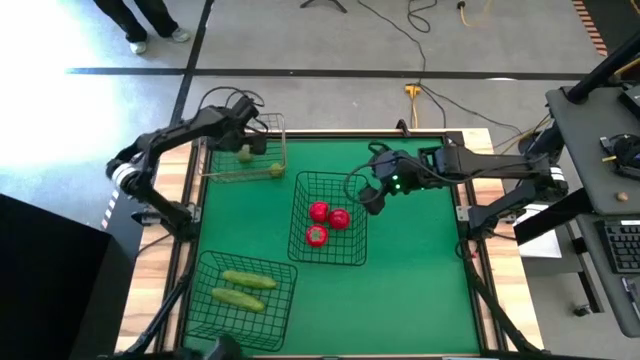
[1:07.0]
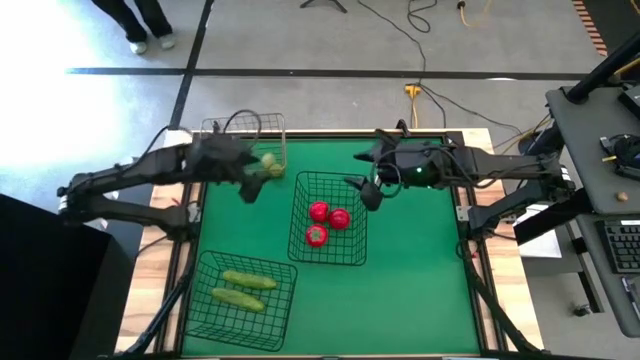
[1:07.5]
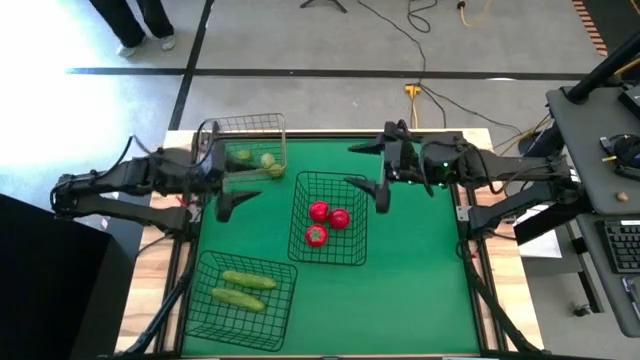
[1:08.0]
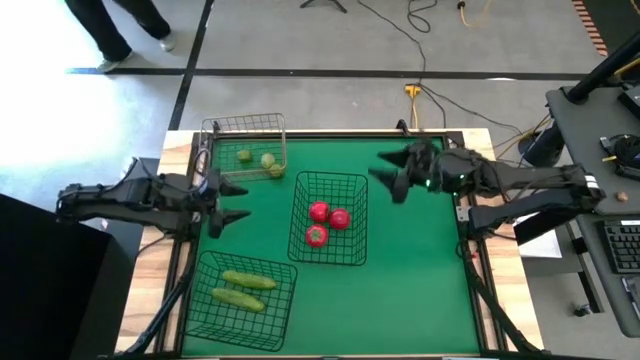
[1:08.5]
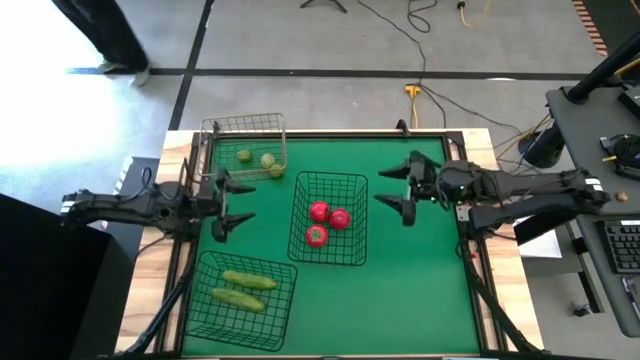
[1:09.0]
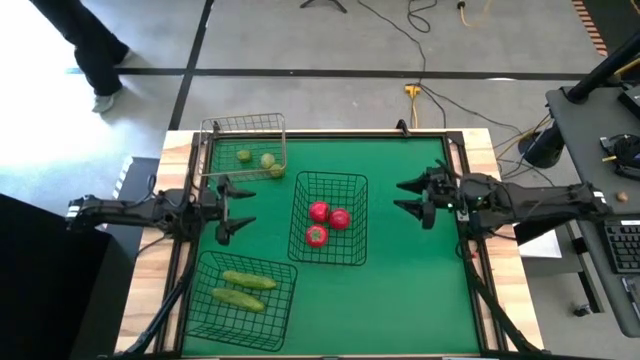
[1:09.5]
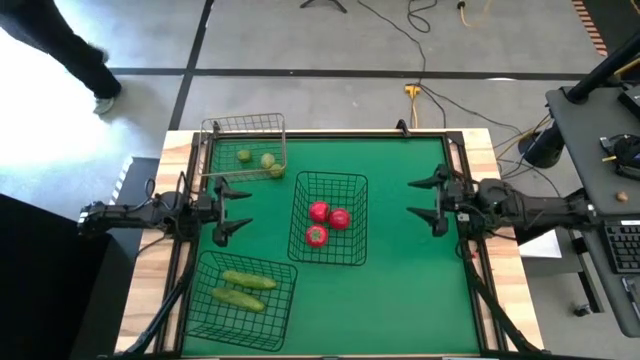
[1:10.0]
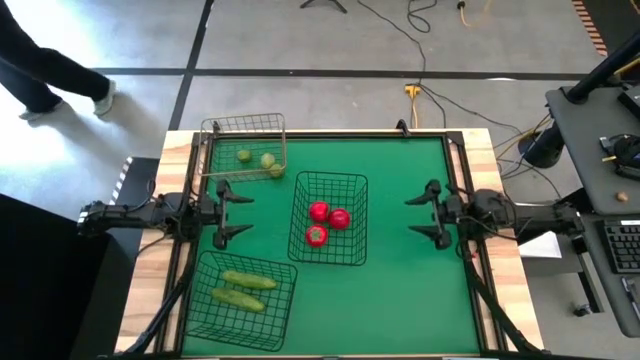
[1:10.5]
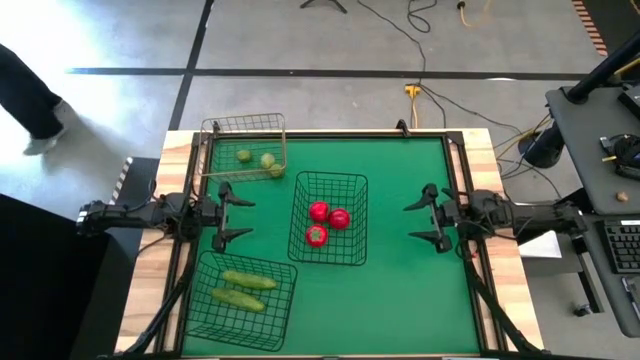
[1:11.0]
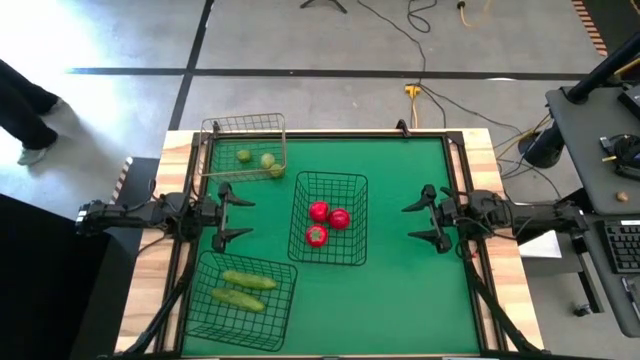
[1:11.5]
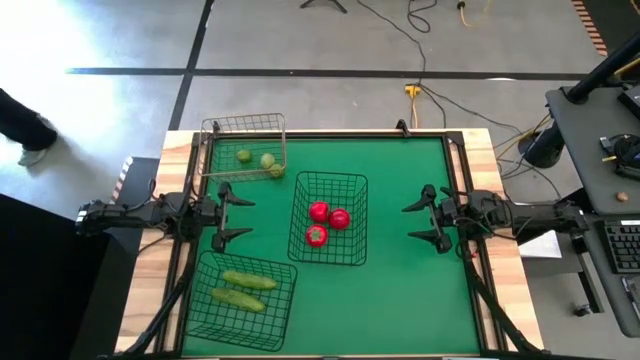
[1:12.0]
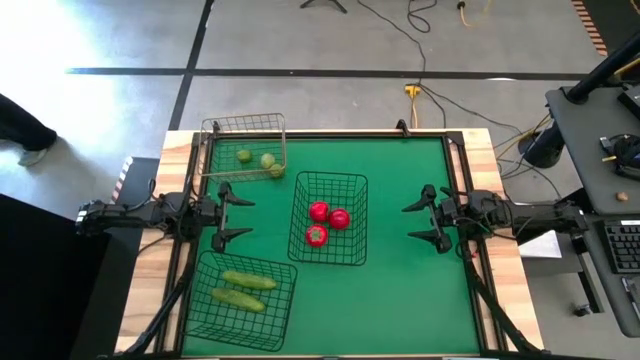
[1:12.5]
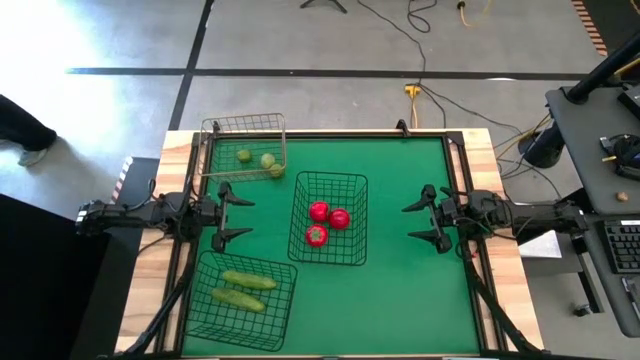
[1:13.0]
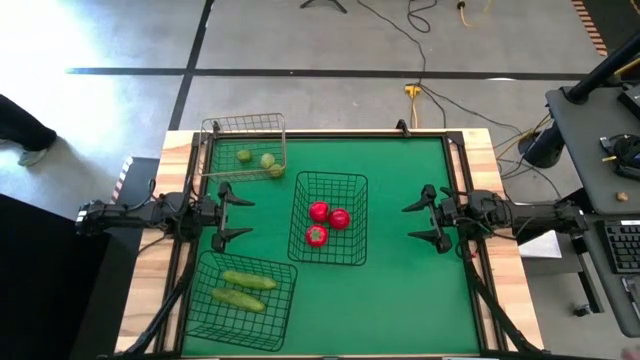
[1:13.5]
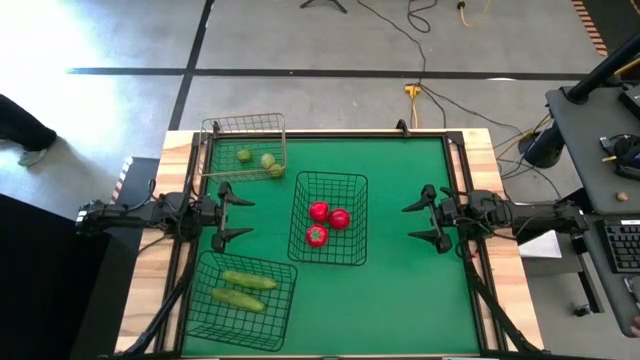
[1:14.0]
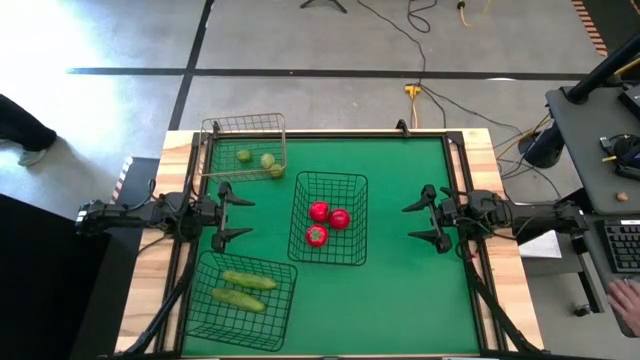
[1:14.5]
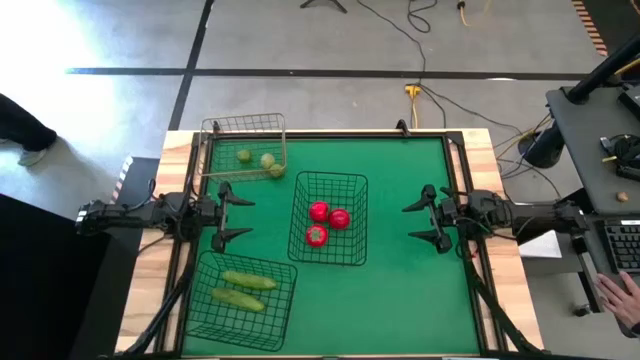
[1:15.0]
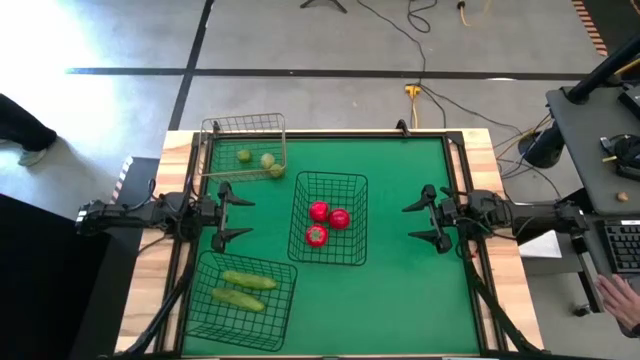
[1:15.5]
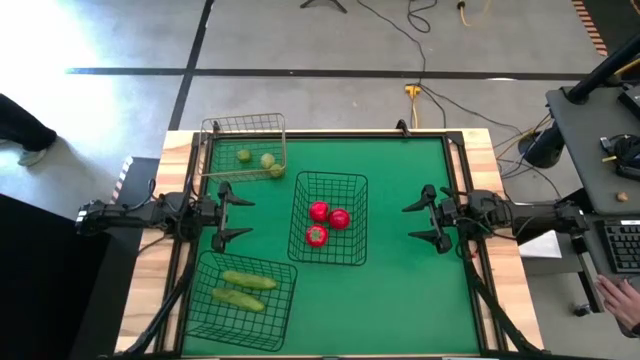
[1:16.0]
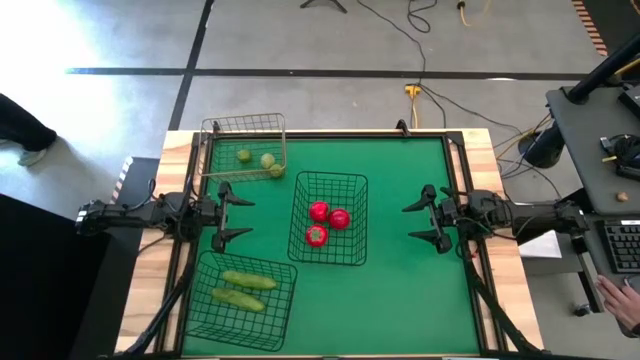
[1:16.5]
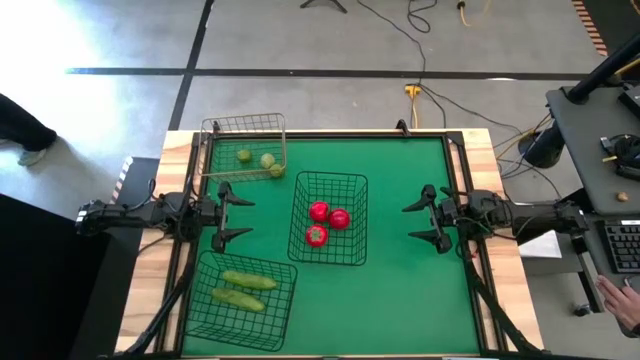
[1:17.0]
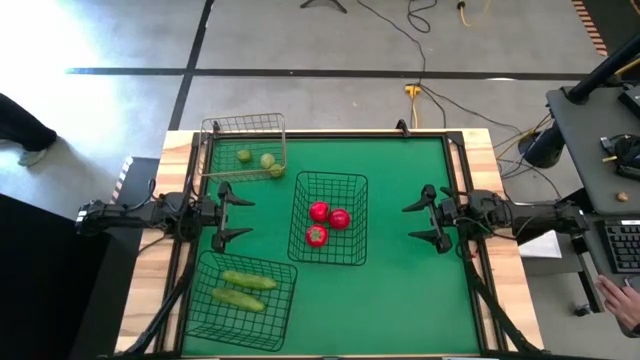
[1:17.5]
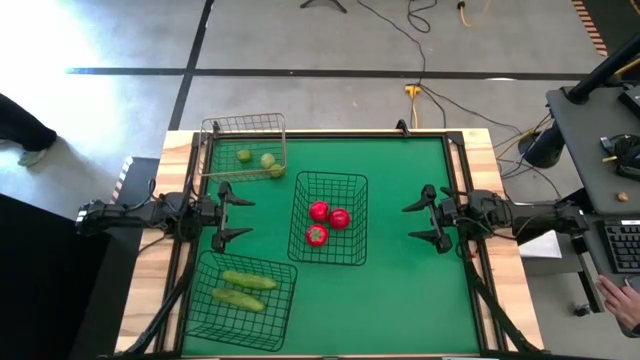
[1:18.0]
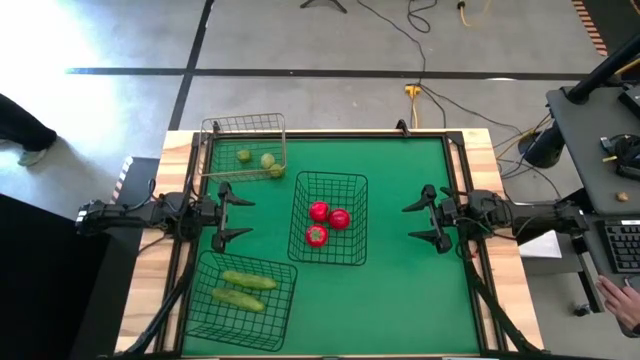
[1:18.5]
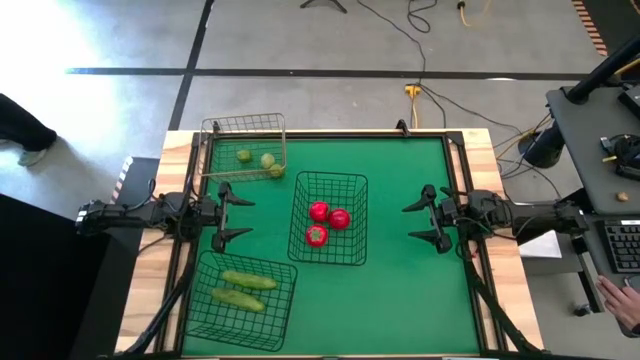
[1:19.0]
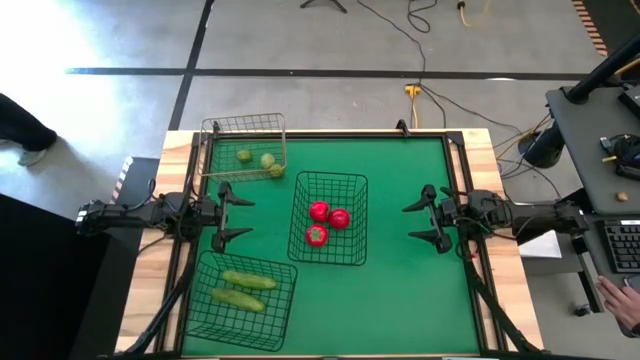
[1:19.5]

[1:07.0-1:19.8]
Task: Sort produce into baskets
Return to Home Position

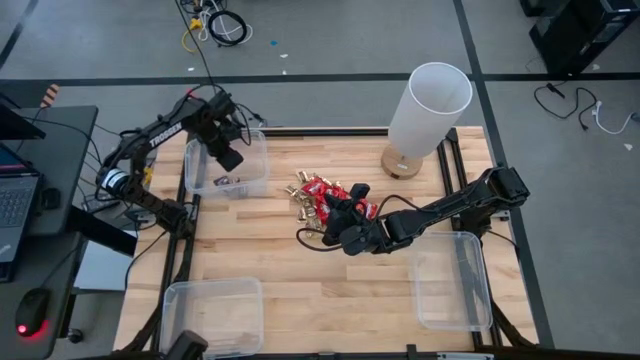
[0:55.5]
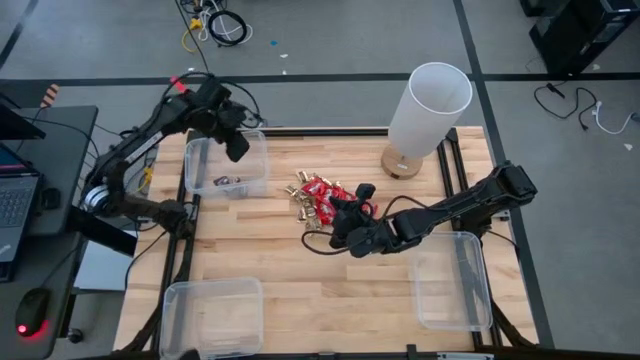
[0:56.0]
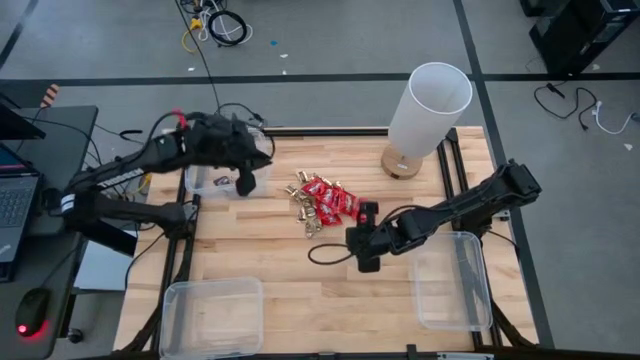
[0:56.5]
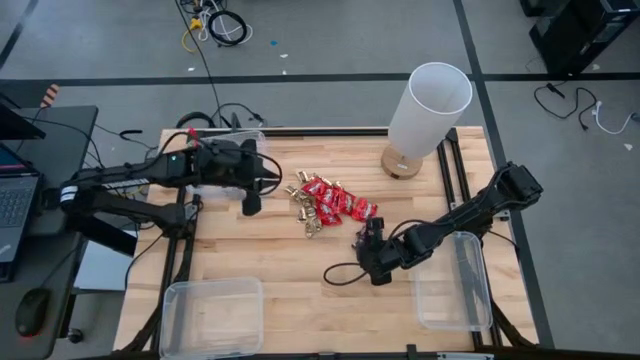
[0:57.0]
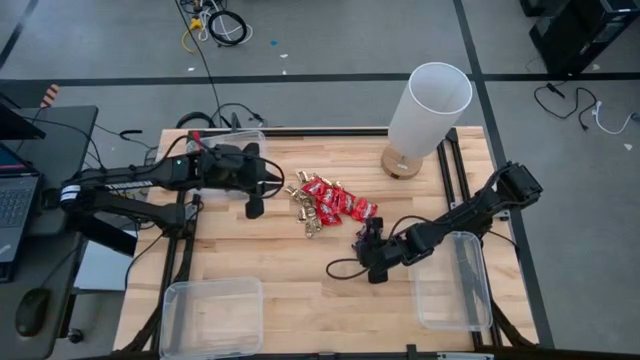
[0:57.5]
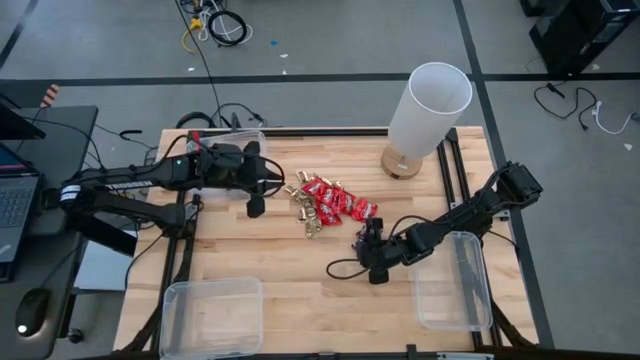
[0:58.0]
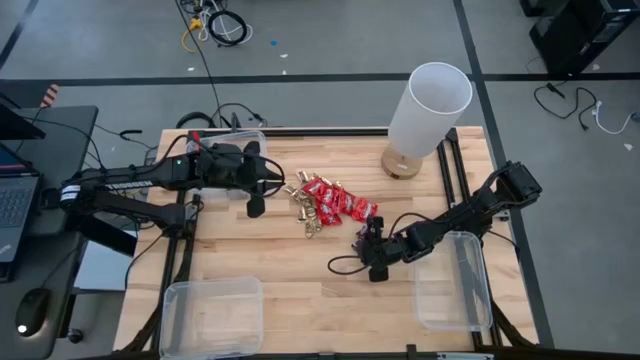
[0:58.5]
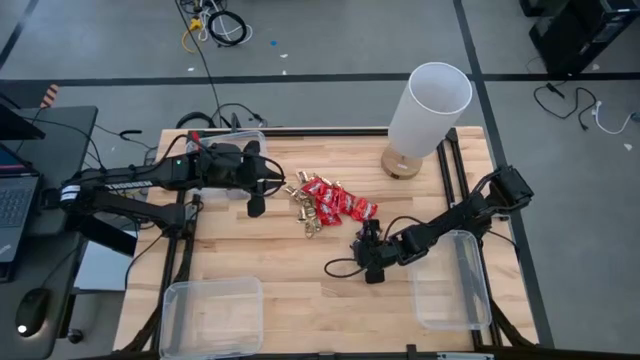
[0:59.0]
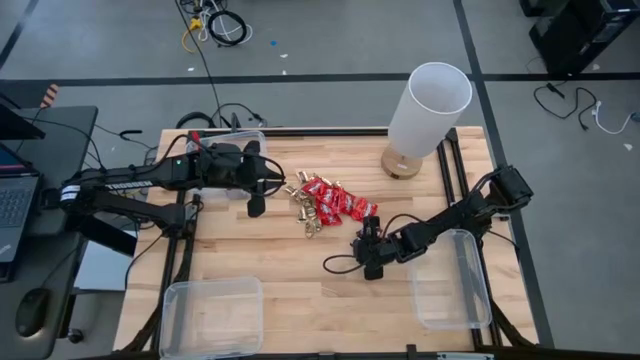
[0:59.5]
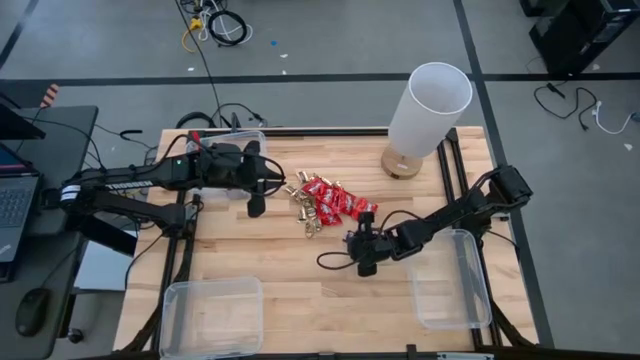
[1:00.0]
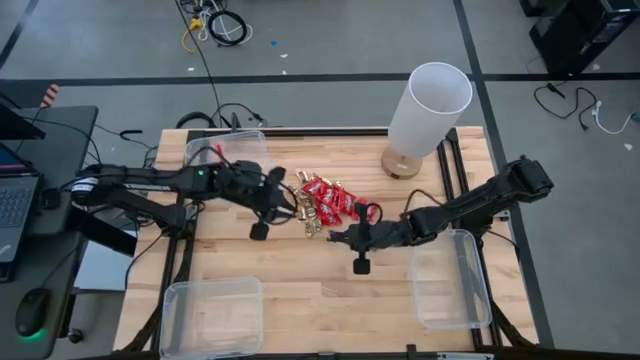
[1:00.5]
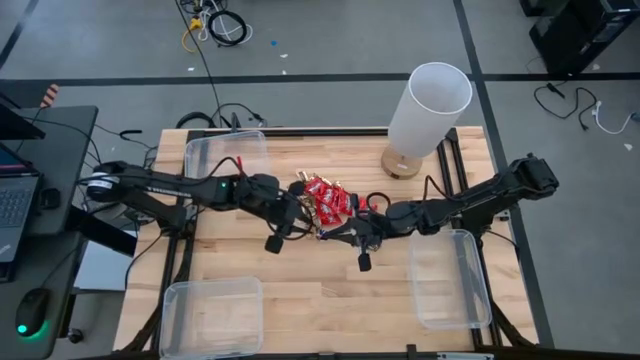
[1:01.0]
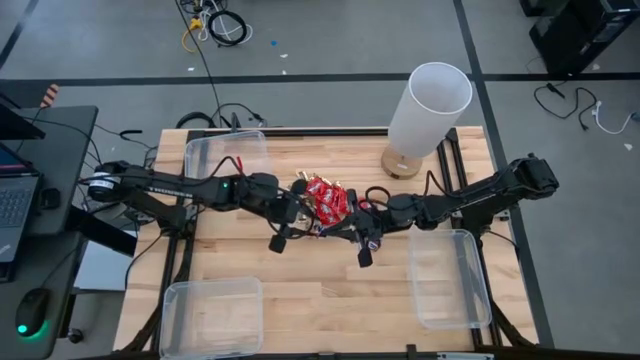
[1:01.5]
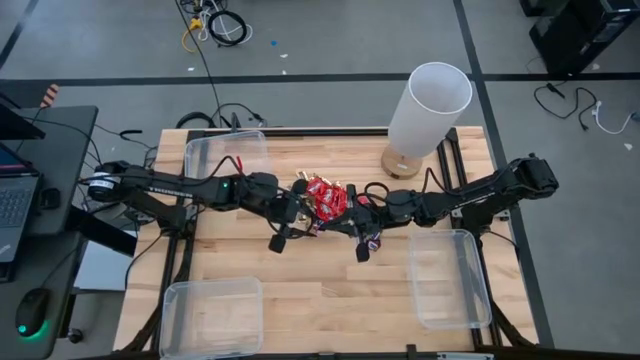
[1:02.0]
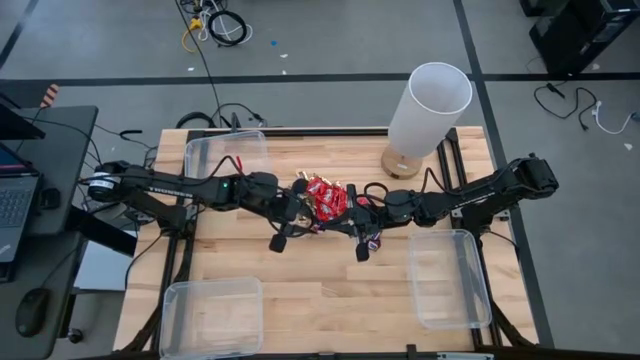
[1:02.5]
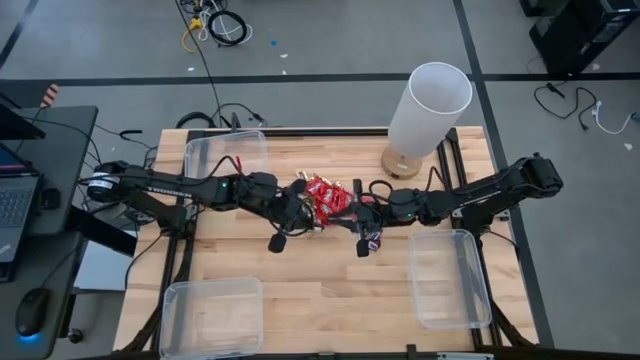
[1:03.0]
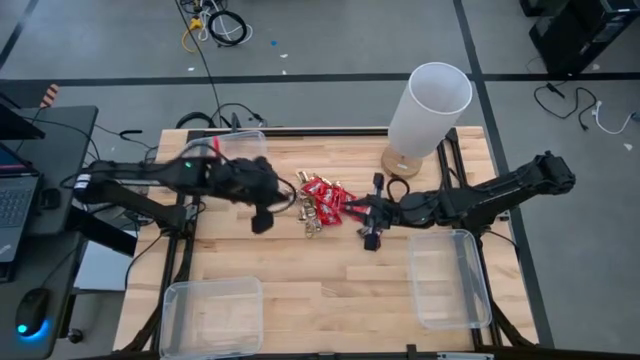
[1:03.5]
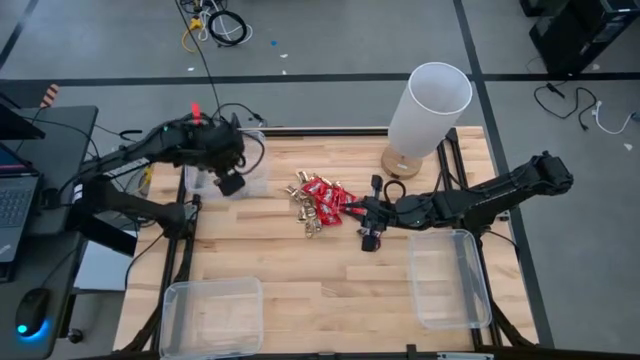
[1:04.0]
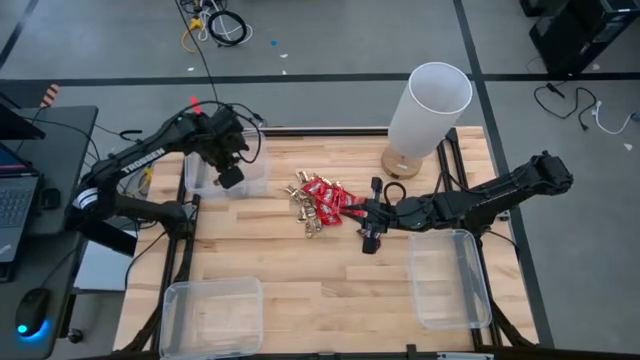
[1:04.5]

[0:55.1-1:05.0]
Task: Sort candy
Put the brown chocolate into the top left transparent bin
